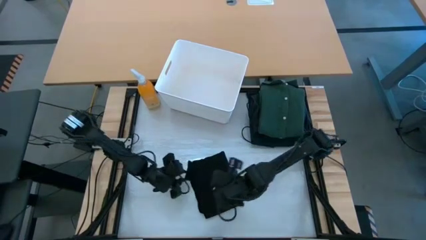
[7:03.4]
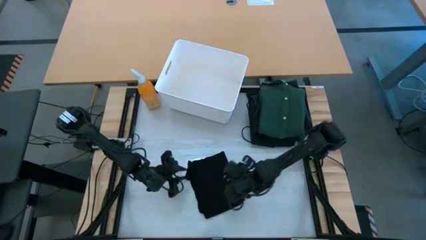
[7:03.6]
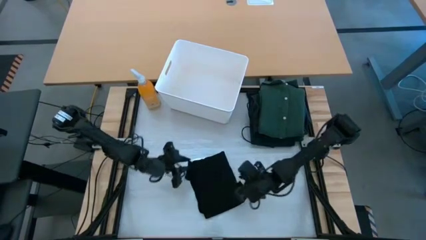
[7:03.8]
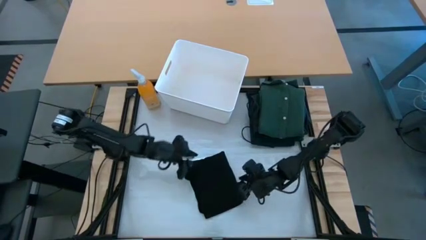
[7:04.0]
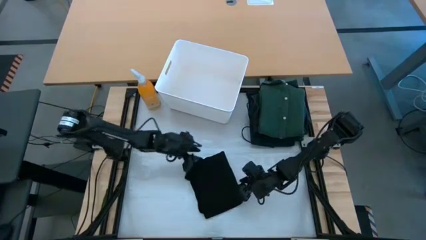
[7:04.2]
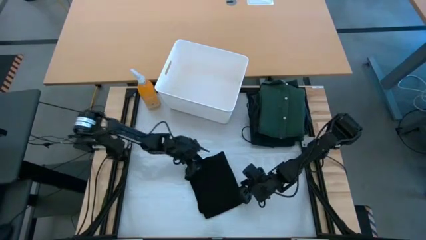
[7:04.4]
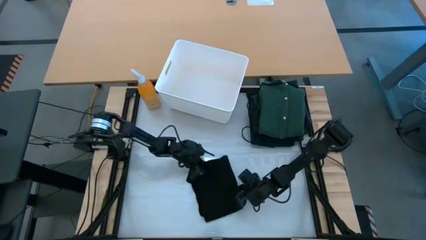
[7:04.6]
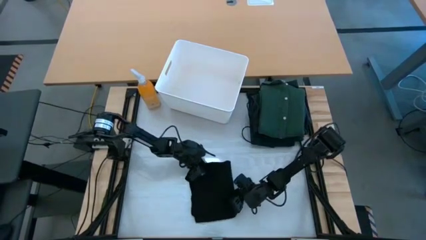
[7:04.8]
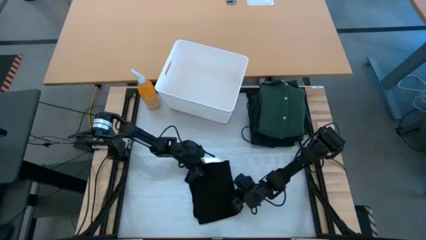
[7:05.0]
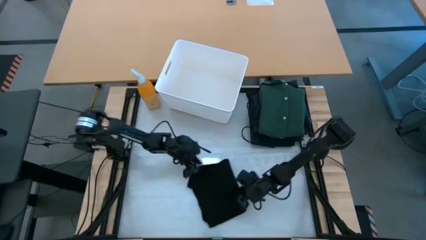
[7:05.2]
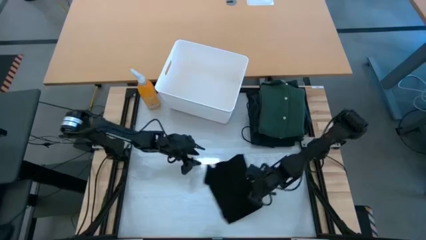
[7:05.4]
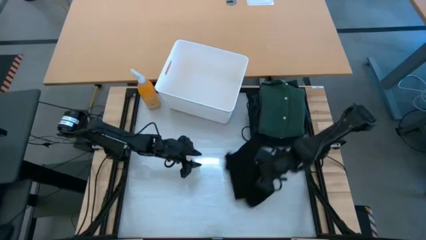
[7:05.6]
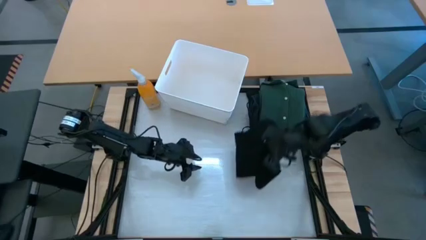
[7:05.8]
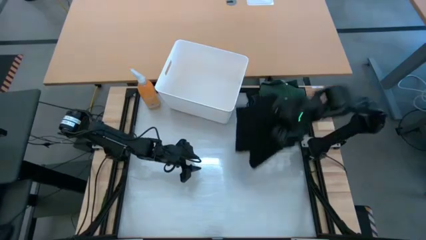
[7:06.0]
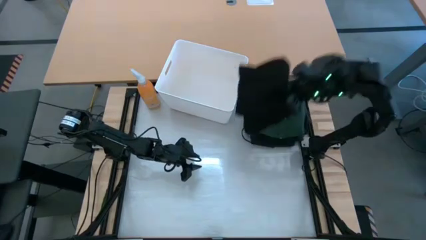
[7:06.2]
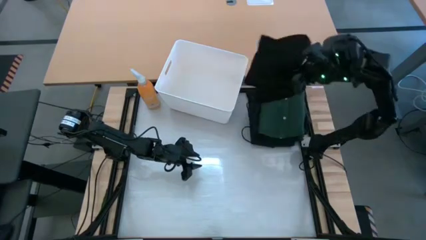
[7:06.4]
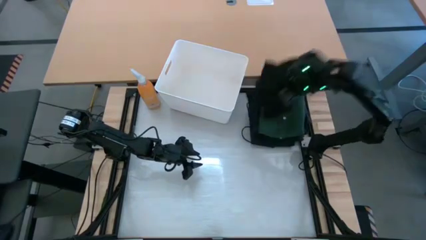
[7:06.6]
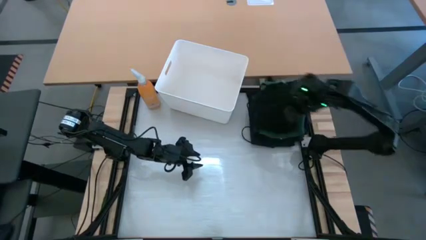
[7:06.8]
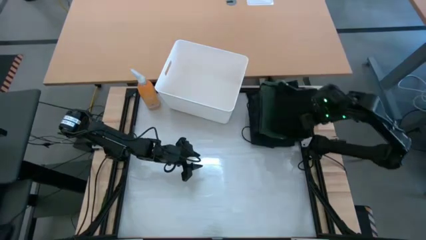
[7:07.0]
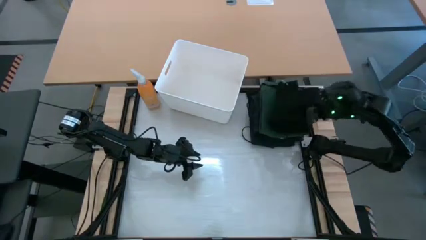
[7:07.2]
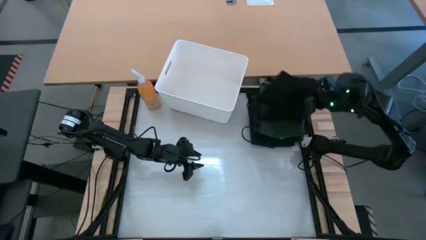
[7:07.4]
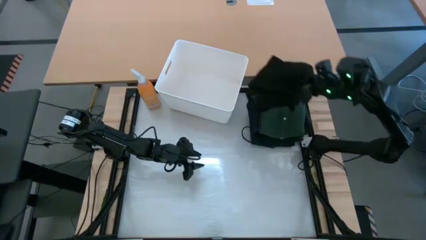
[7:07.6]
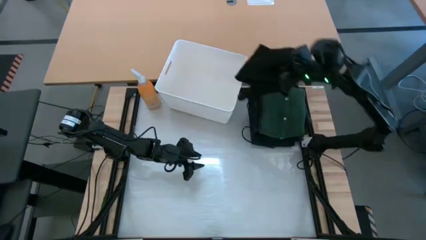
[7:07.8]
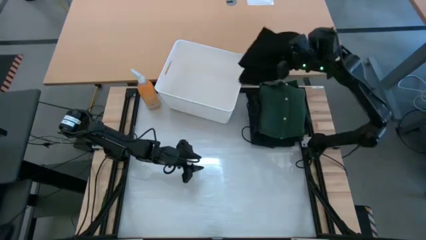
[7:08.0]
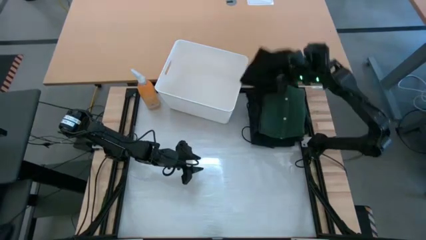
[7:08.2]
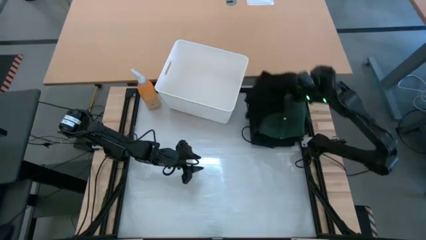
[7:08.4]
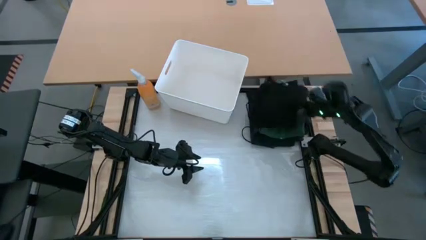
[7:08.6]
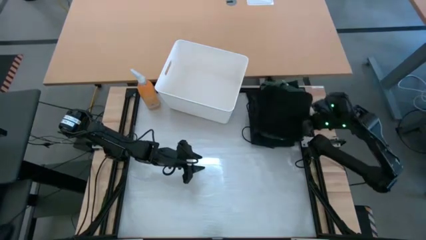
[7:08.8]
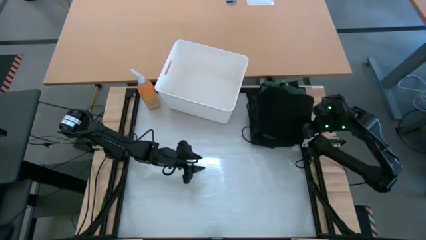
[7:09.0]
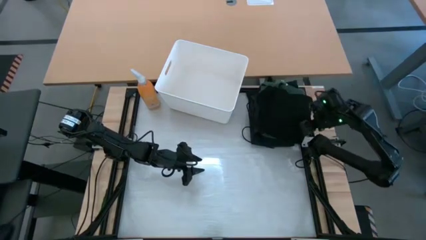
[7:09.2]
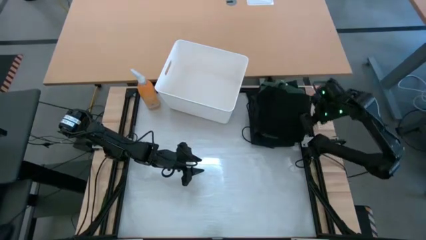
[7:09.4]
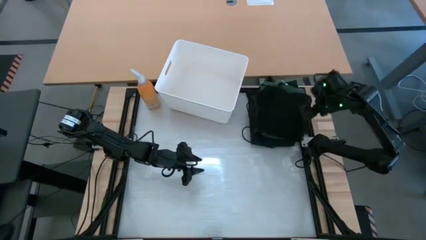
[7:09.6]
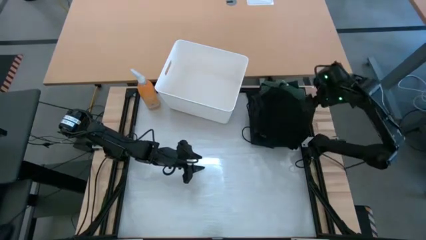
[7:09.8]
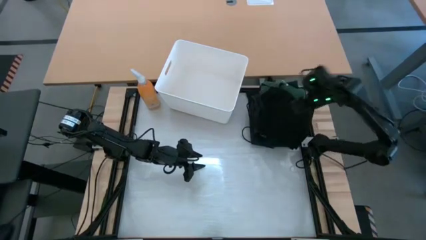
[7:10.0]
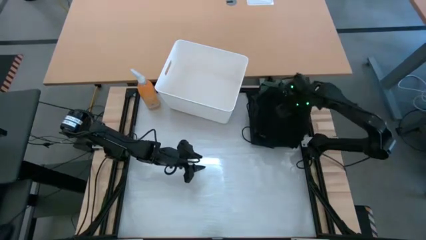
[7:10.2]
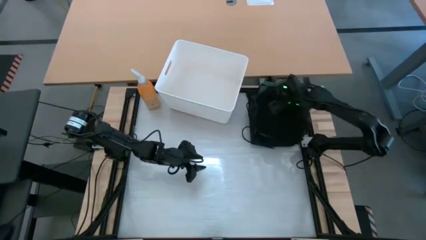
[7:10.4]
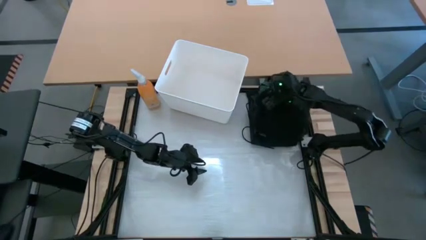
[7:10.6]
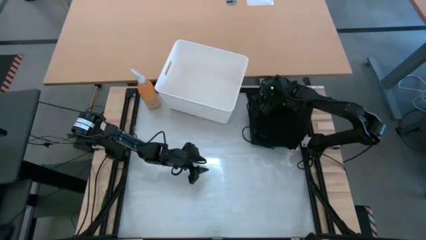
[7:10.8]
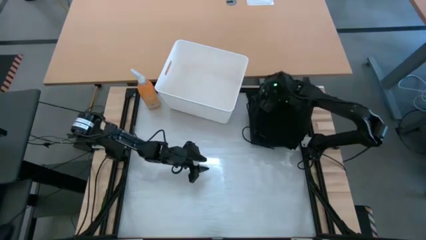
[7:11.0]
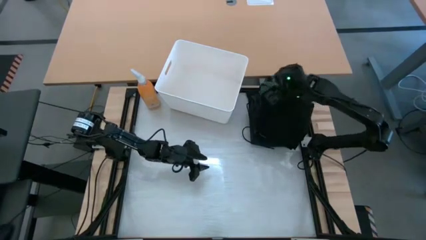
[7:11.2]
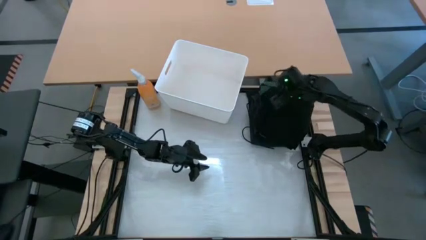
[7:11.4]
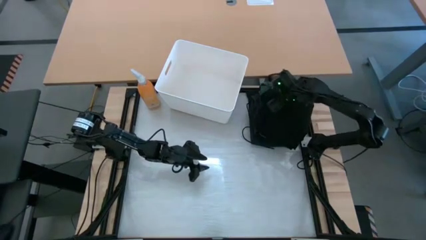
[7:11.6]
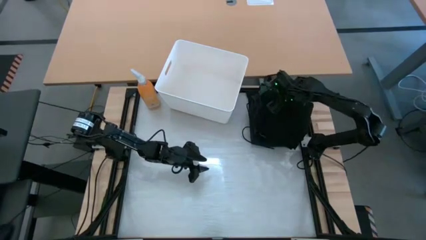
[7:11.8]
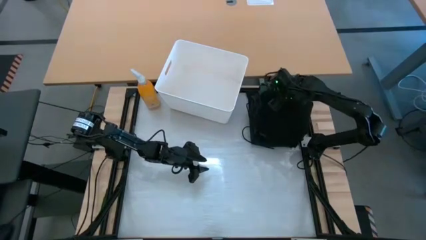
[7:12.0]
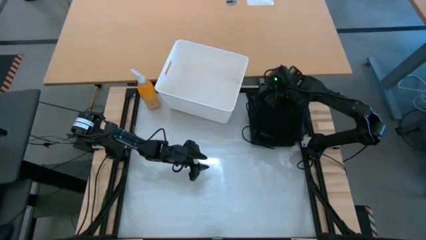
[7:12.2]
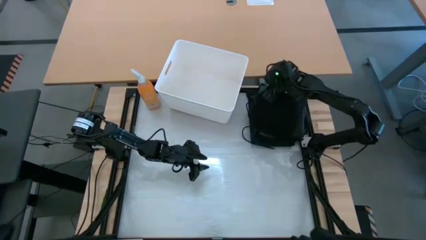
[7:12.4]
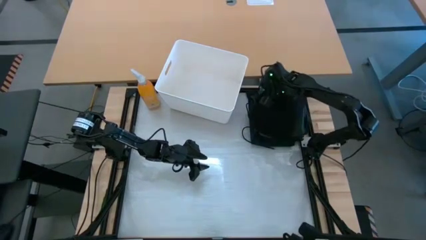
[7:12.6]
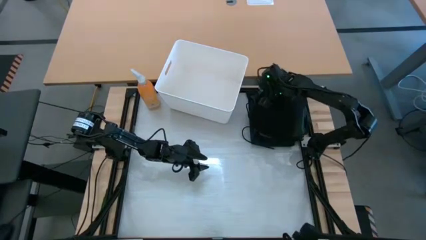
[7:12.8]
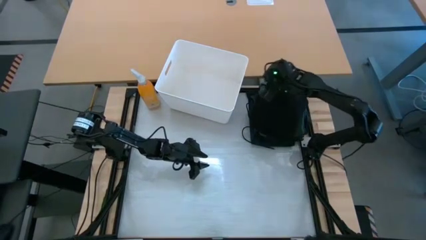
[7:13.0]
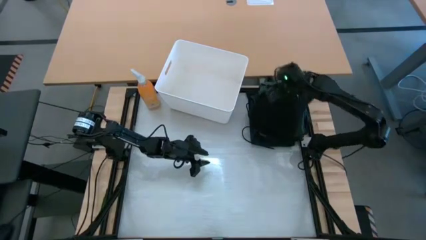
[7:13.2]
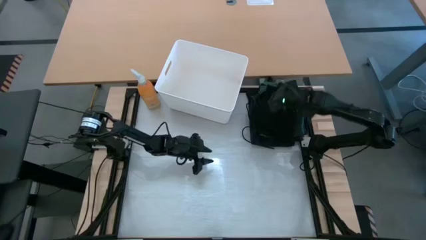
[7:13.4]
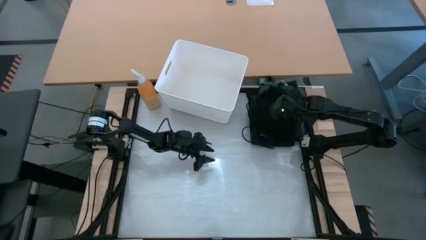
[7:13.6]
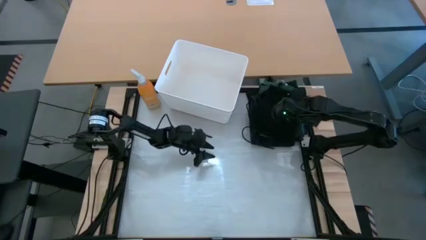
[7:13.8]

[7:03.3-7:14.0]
Task: Fold laundry
Stack the black shirt on top of the green polo

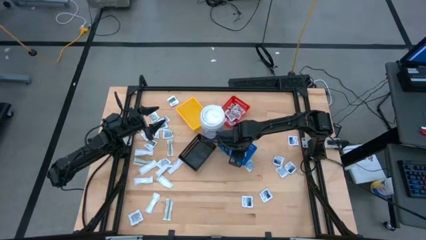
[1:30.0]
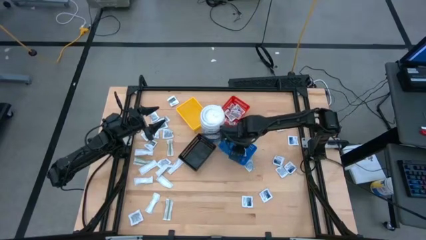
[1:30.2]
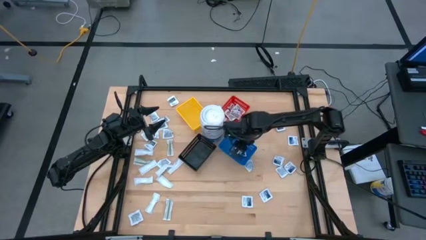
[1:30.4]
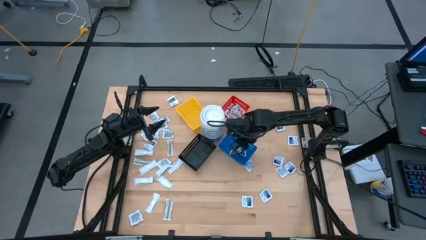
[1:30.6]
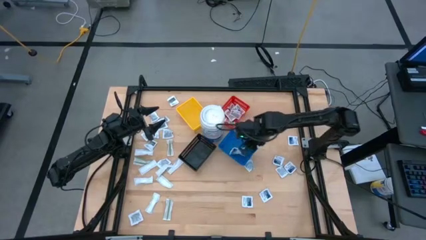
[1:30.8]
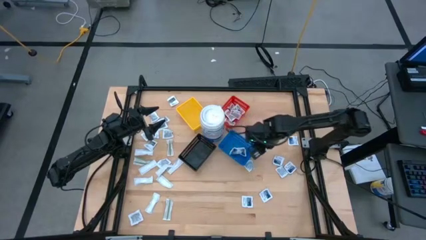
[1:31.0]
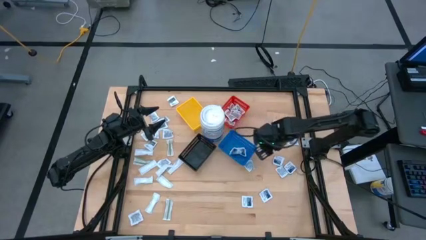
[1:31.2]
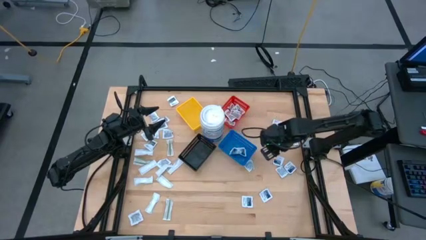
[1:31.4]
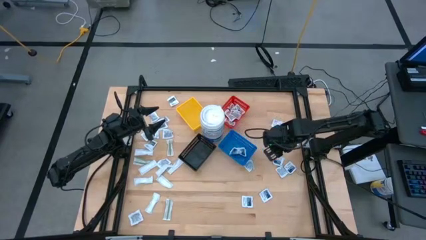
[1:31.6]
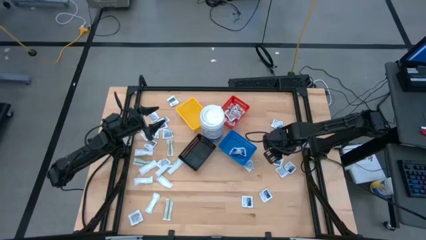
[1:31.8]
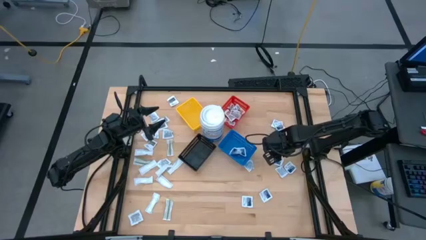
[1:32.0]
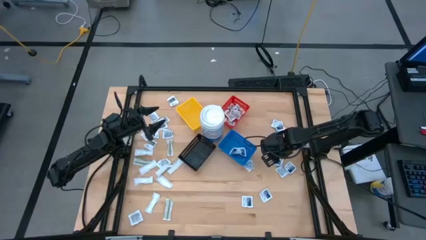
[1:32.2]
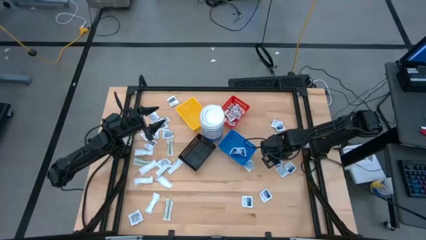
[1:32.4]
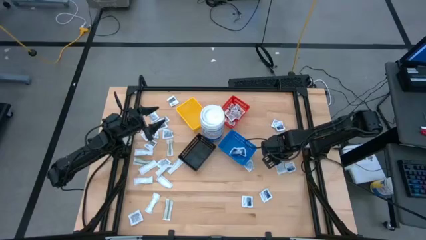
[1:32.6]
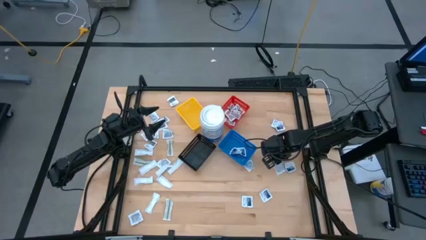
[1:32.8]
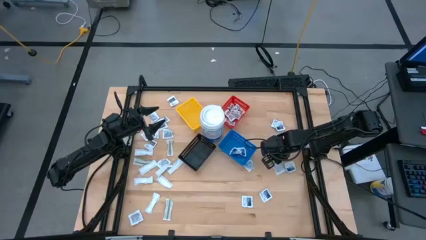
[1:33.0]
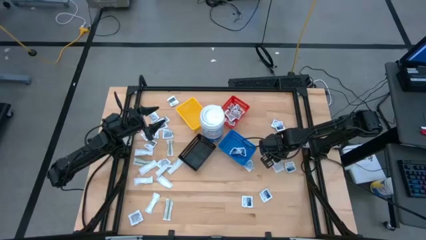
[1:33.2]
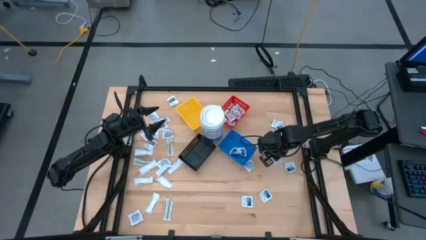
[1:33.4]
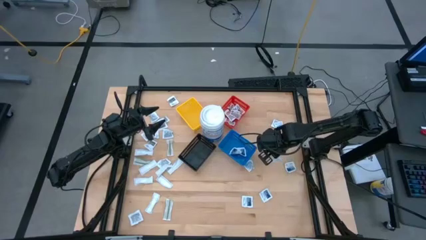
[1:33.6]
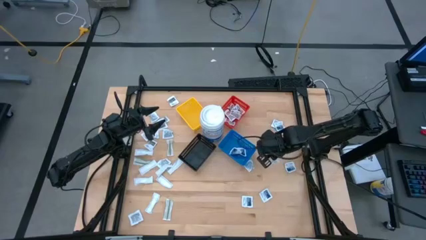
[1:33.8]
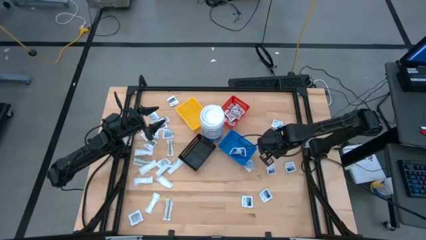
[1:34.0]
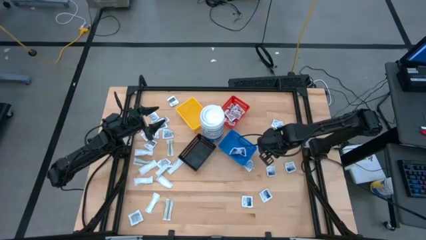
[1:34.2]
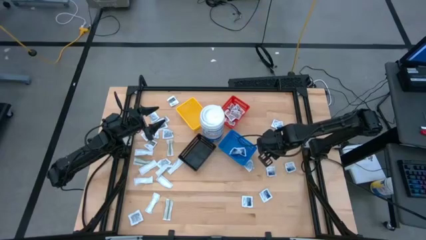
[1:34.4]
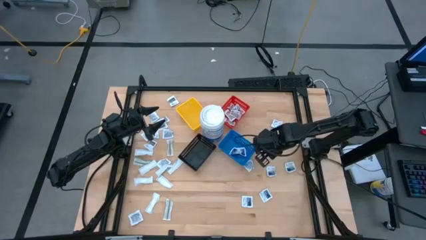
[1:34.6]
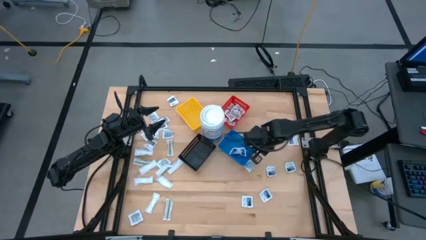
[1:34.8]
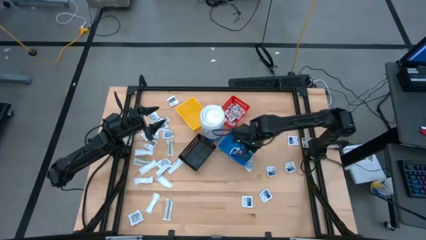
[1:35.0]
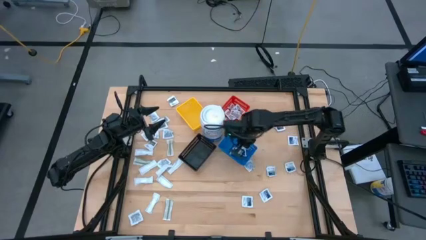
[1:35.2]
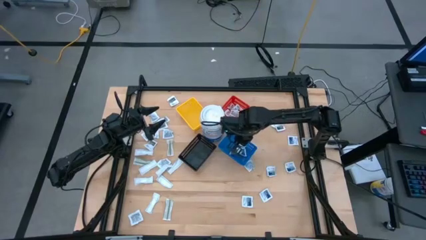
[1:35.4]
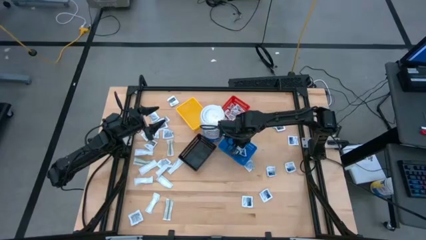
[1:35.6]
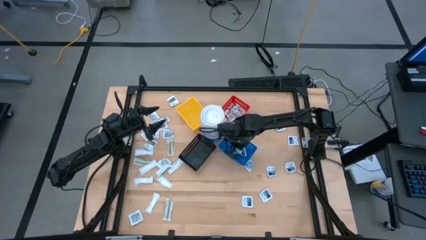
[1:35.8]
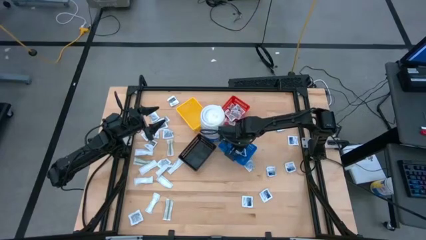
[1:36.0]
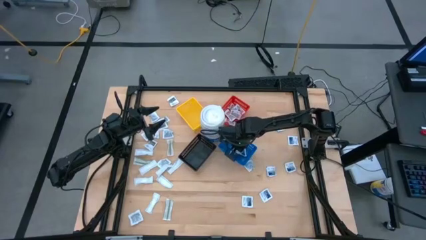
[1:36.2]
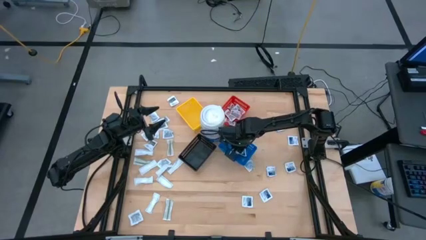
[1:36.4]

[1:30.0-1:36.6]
Task: Pick & Place First Aid Supplies
Put the alcohol pad into the blue bin
